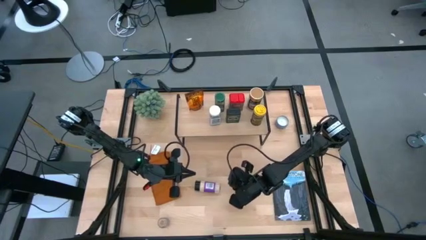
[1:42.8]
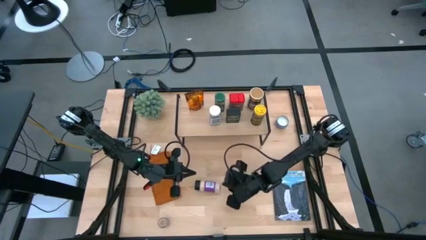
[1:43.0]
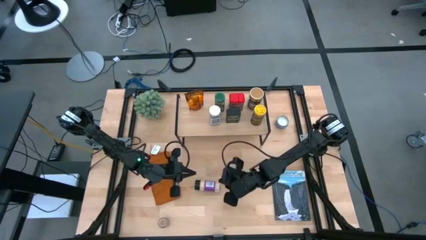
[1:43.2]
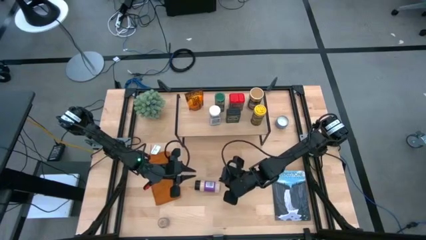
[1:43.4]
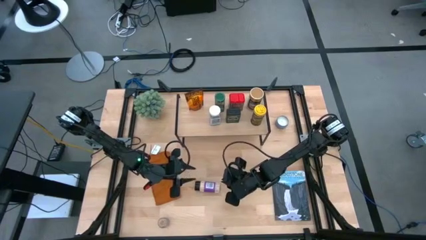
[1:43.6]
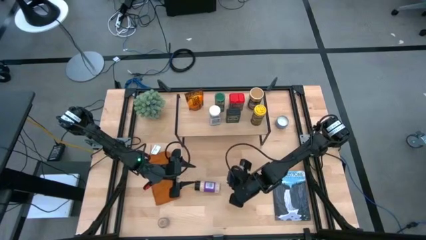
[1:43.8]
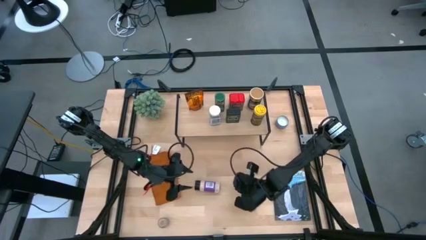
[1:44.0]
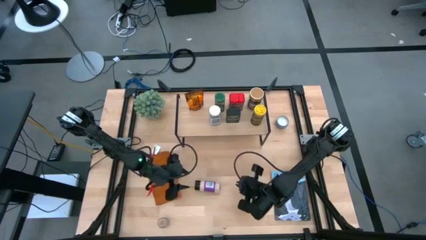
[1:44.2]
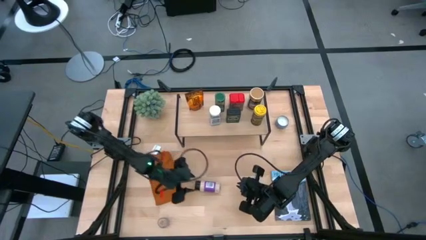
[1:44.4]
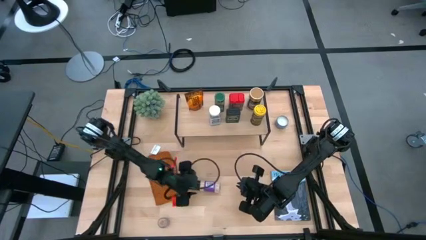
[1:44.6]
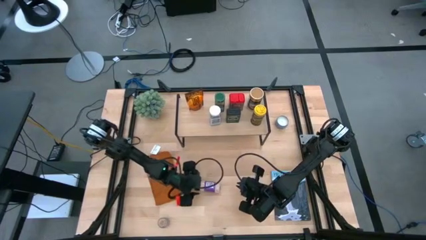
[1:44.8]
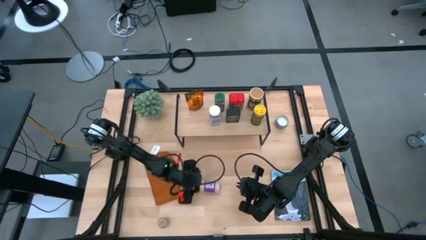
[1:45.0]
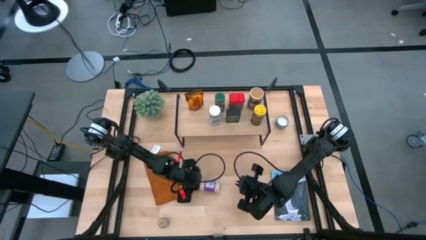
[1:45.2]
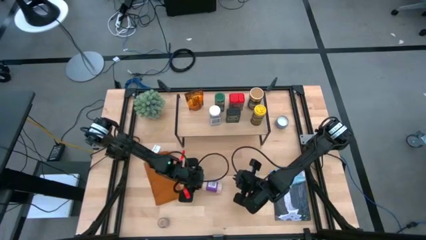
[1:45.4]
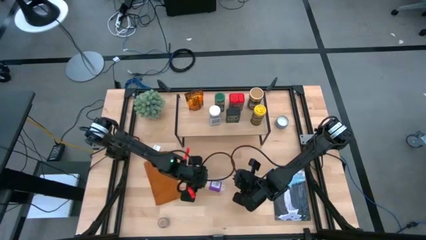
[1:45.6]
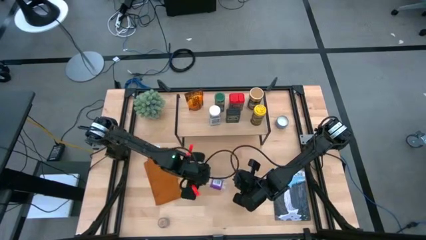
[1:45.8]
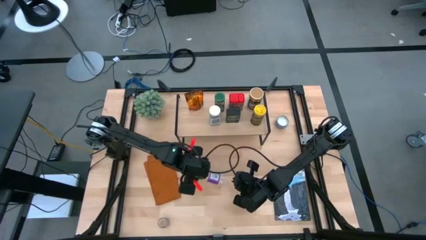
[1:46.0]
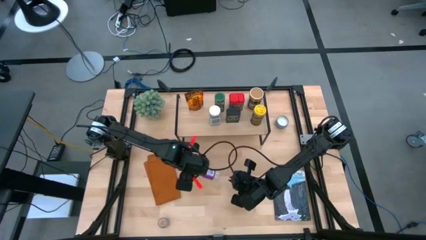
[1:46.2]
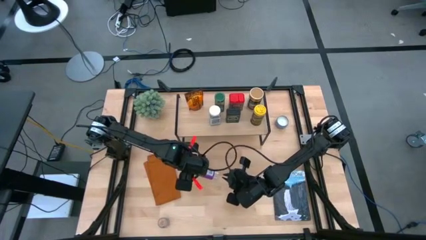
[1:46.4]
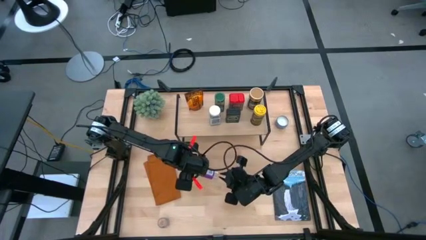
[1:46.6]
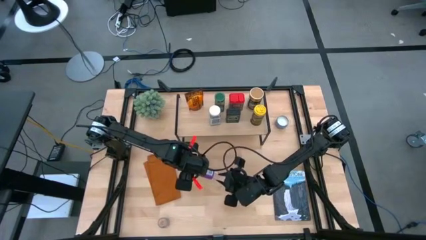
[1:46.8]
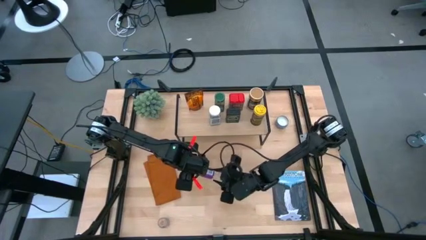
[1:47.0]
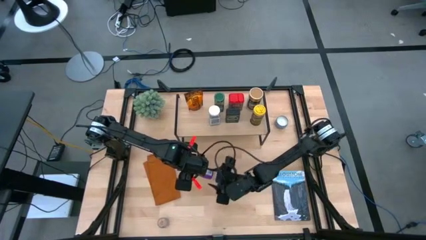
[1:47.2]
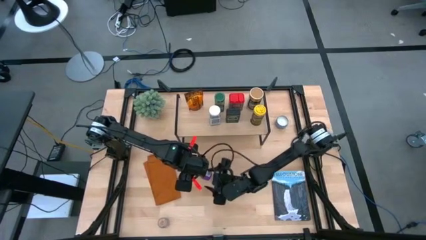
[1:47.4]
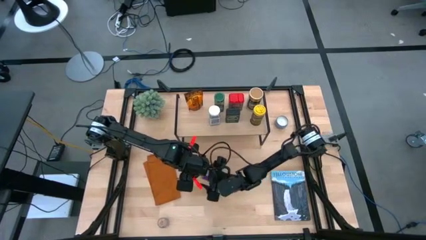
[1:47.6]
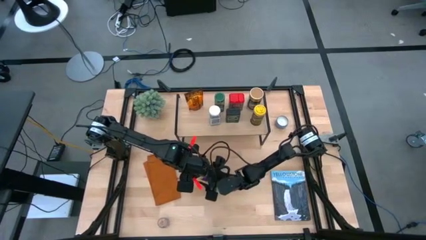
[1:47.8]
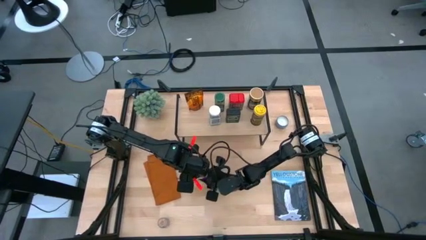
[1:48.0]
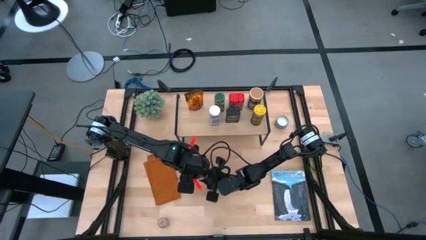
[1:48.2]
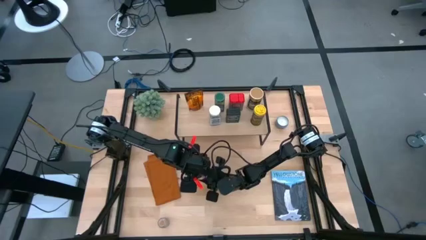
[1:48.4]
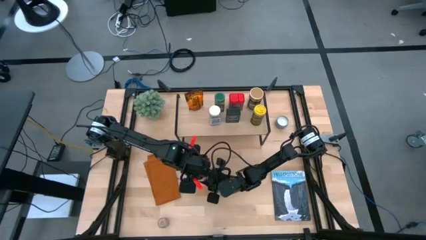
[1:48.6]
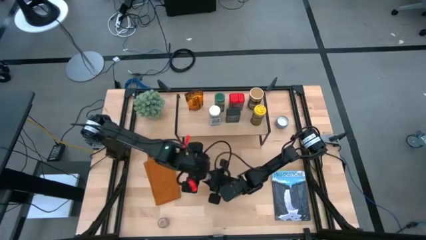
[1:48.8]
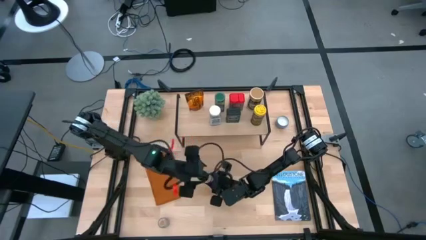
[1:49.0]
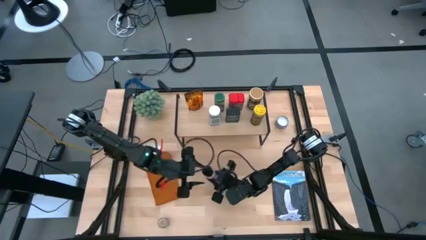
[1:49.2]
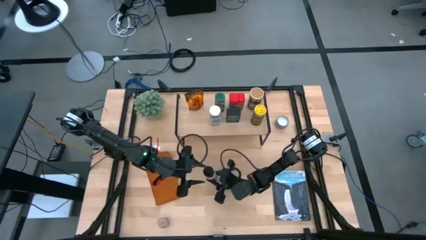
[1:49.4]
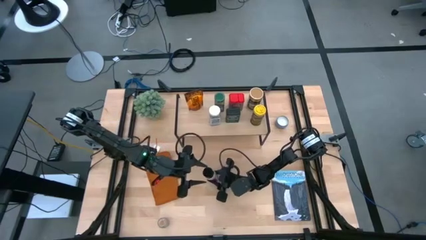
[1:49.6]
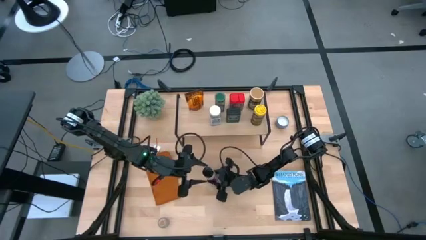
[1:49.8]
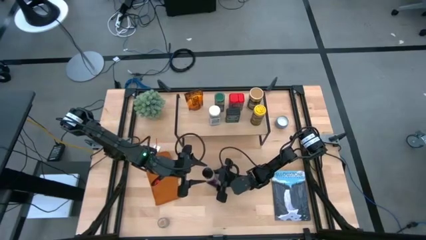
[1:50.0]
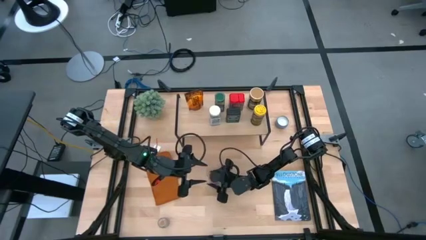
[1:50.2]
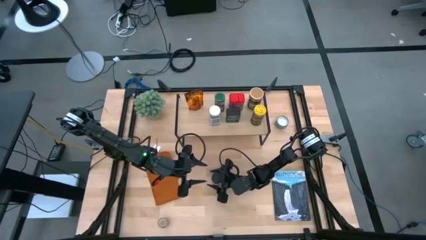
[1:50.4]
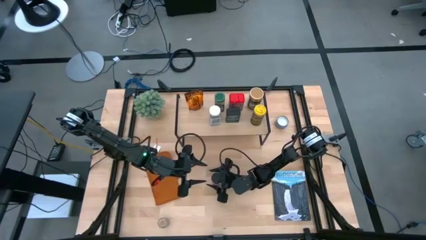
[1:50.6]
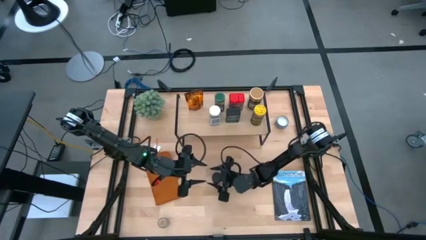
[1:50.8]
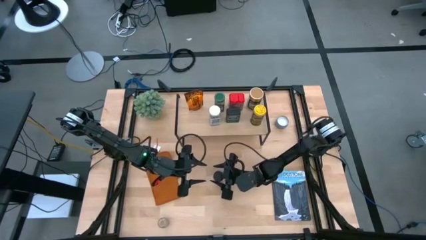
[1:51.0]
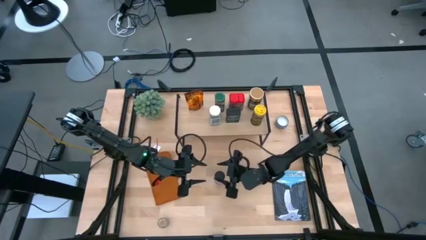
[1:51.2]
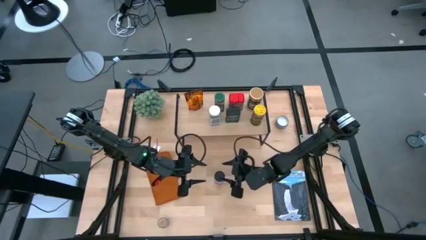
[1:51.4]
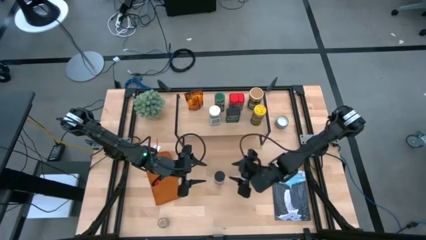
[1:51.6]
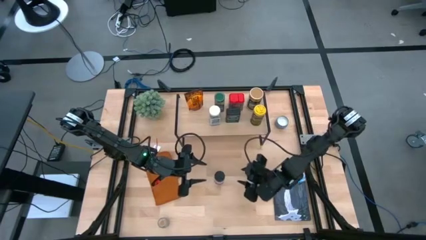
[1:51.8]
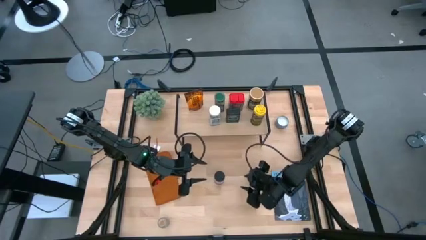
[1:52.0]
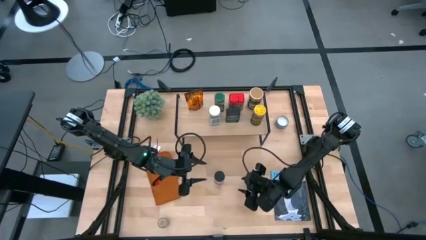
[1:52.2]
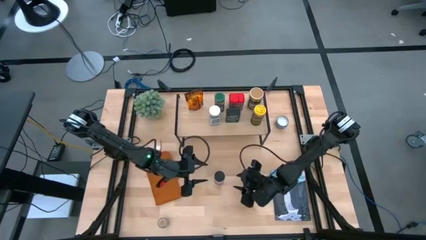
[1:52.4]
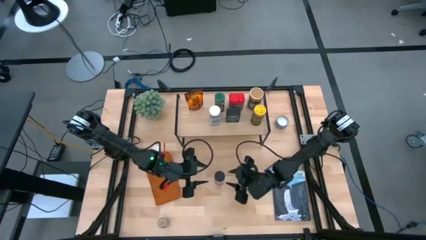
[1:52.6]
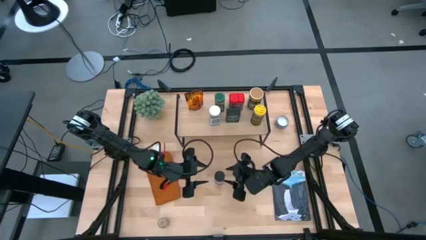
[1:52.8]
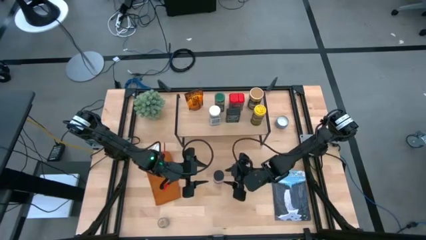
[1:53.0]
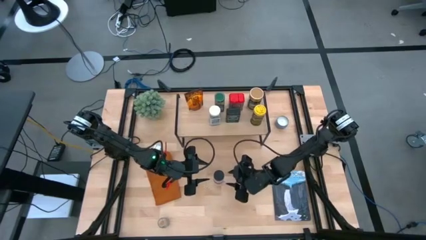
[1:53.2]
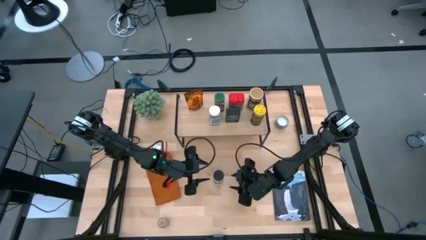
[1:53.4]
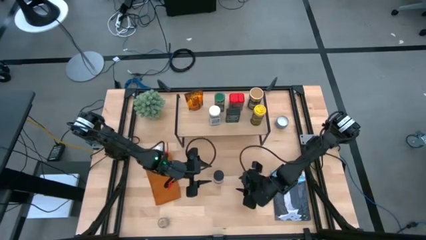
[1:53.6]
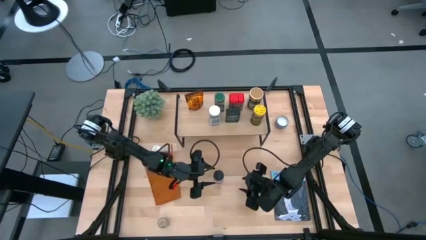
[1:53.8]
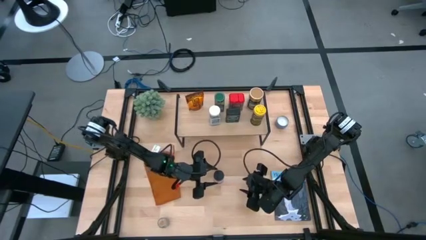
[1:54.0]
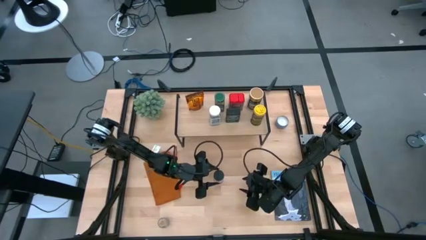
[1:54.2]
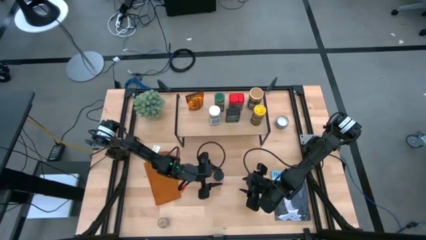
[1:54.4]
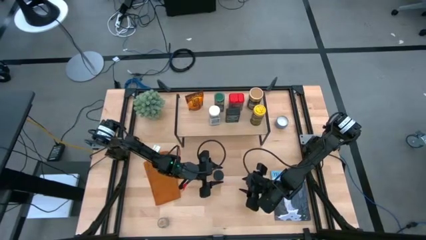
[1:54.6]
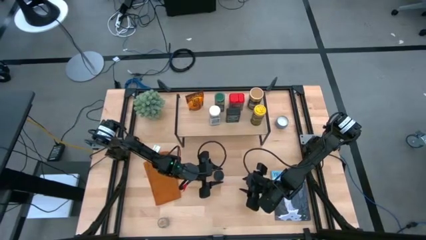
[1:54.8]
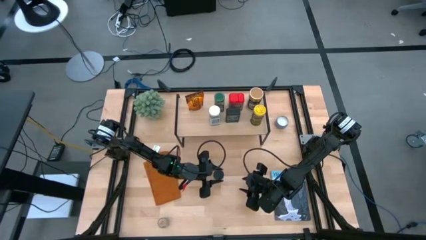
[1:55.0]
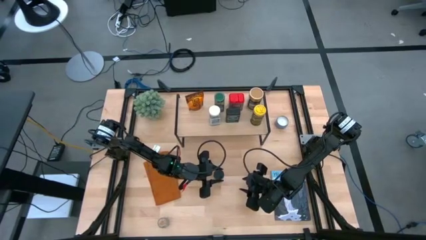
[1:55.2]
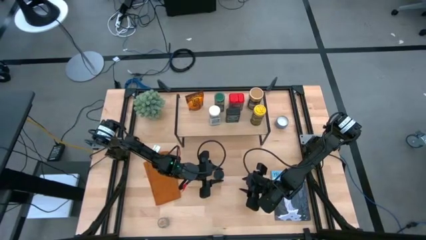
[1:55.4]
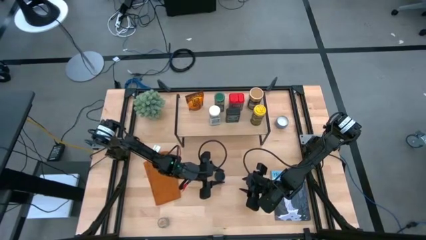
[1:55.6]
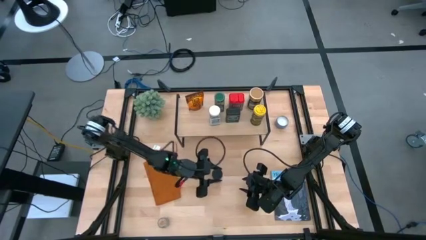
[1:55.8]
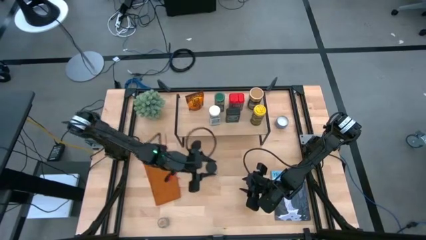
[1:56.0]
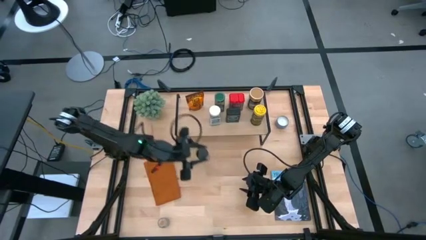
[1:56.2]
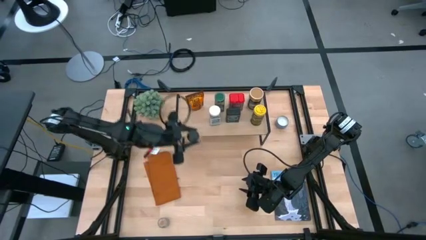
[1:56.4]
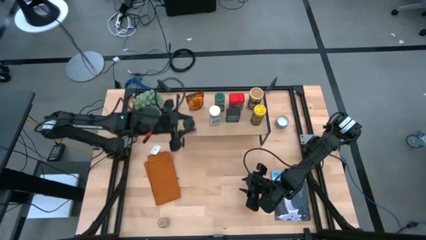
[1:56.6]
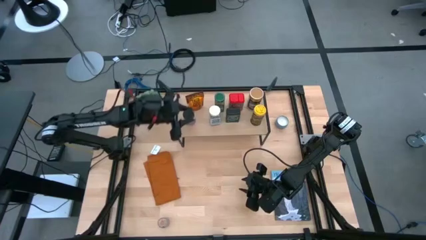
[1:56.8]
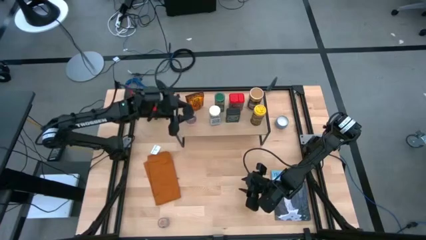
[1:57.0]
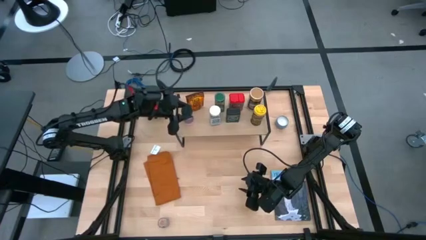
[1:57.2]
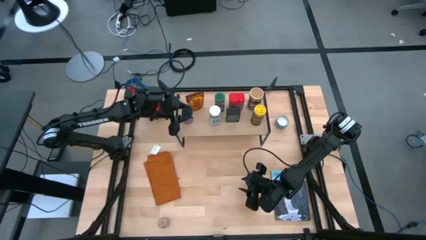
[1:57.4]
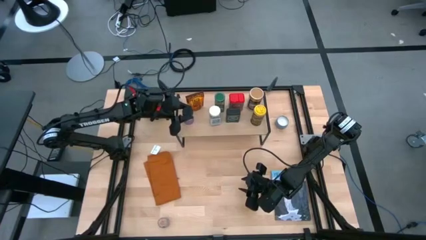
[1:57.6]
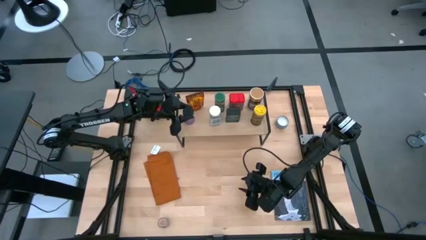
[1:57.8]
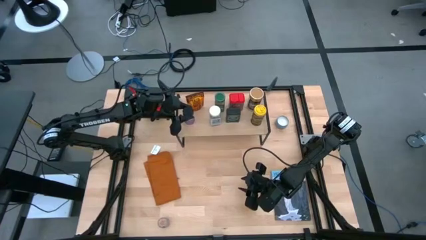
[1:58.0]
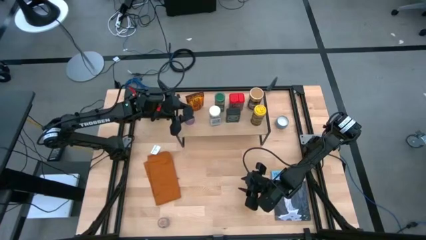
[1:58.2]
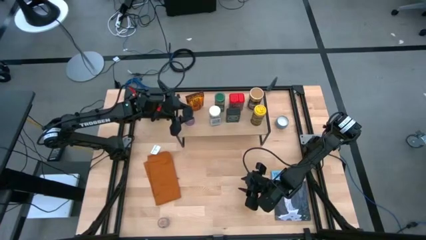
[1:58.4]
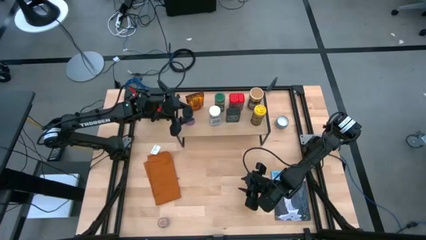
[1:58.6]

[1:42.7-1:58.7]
Task: Shelf spices
Put the black seasoning bottle on the shelf

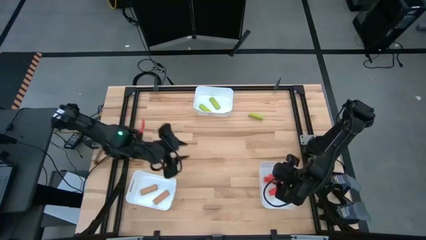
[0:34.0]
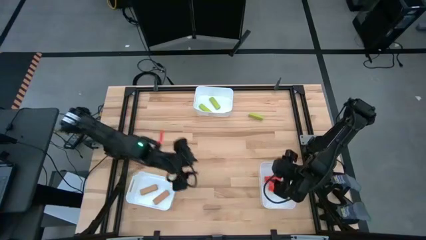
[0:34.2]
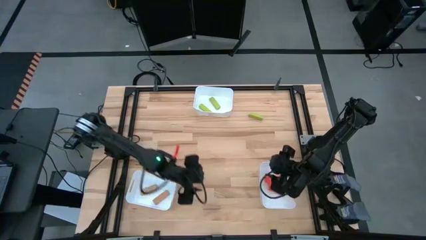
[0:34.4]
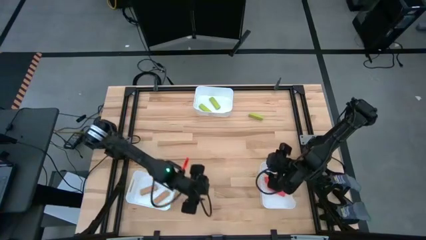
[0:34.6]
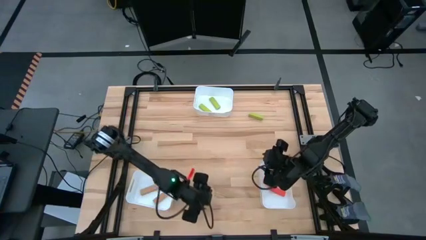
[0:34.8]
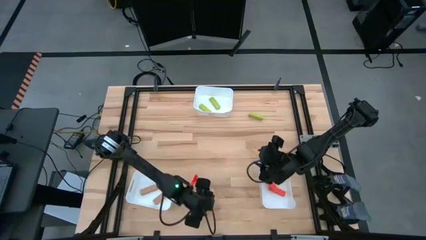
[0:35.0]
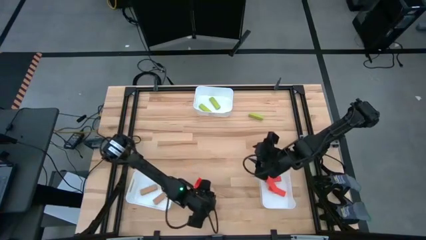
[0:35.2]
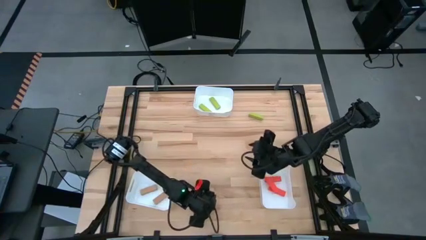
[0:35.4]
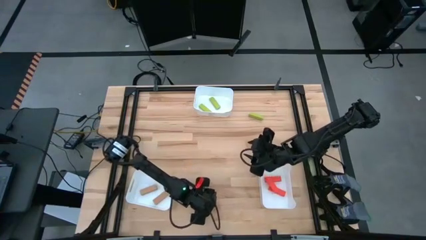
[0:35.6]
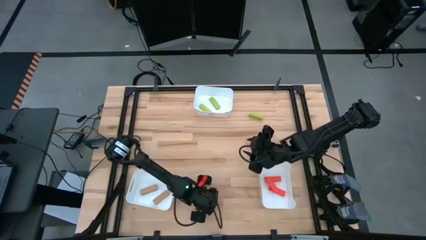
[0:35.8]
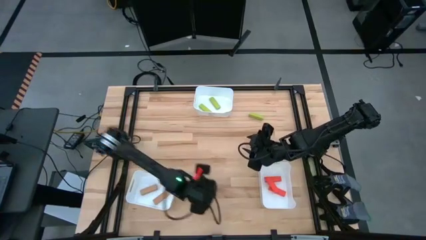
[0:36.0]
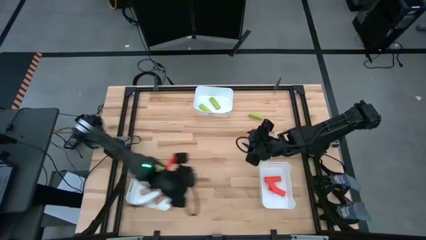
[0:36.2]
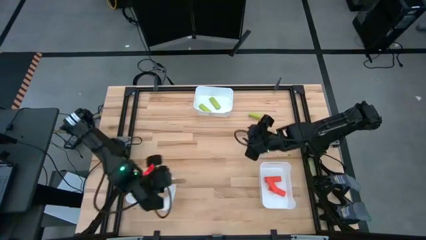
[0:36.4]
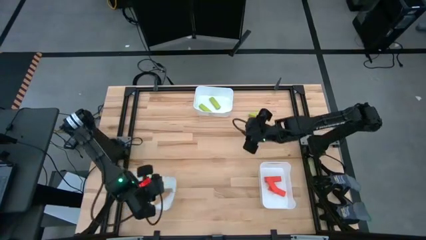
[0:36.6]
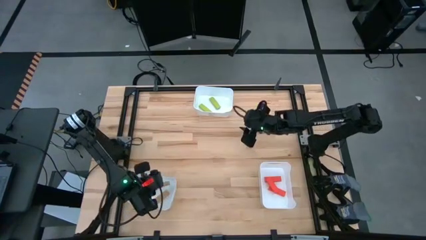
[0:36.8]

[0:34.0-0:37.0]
Task: Sort blocks
Put the brown block into the bottom left white bin
